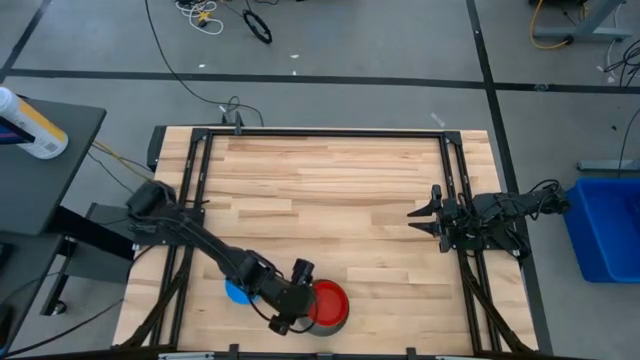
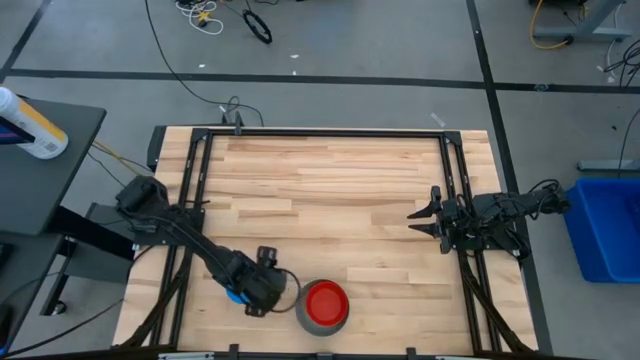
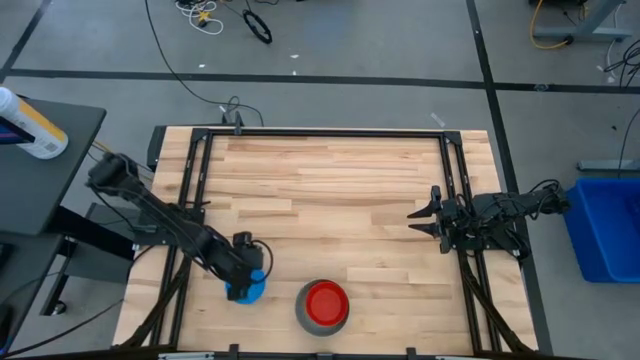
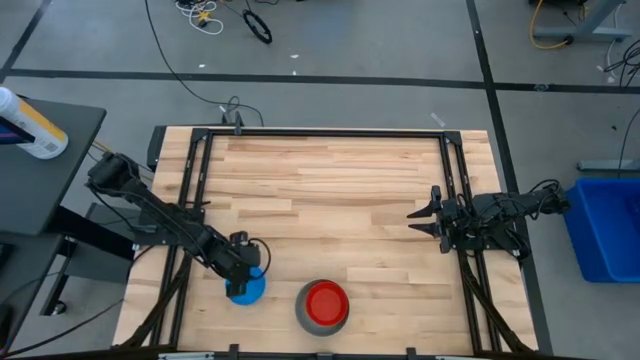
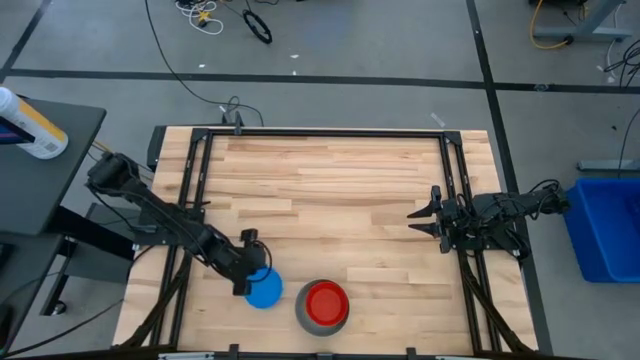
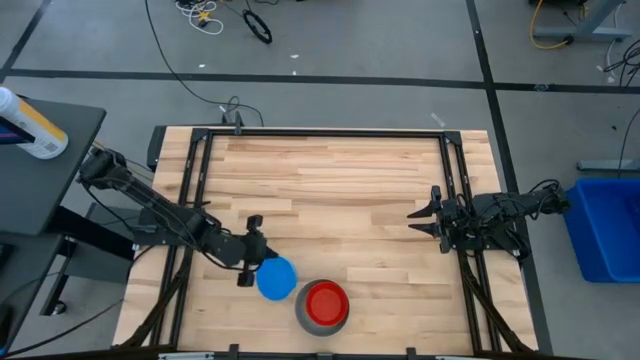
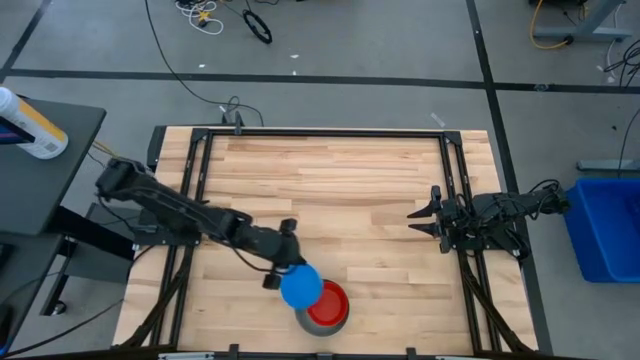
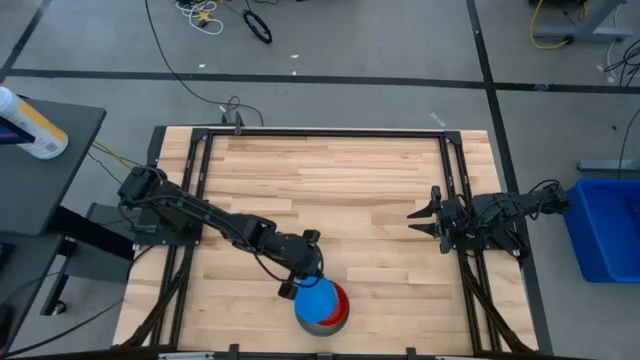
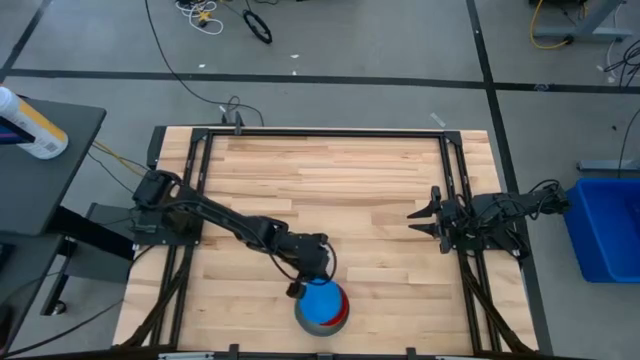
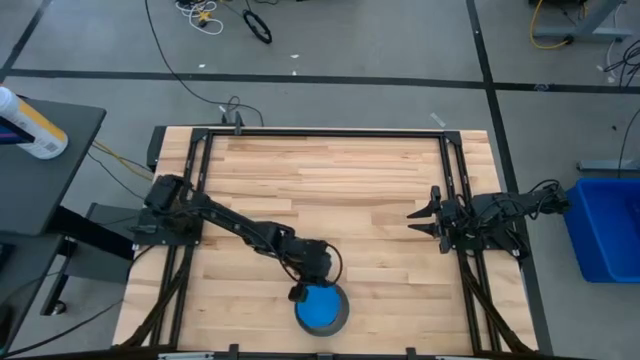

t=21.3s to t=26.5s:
Stack the blue bowl on on top the red bowl

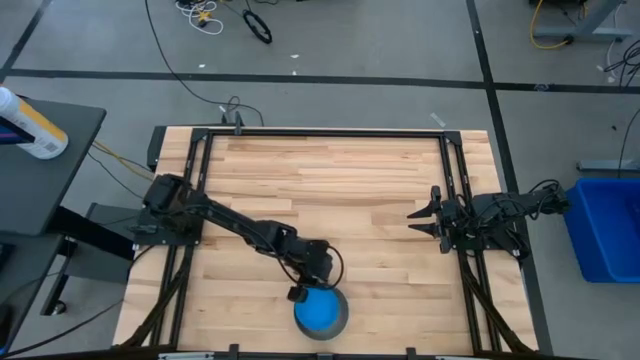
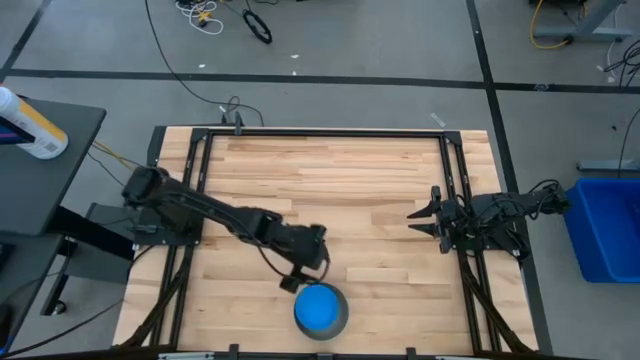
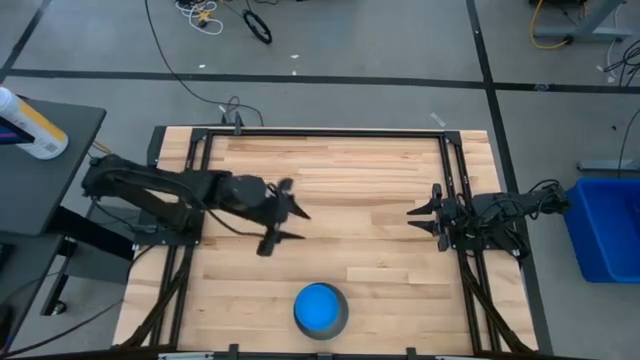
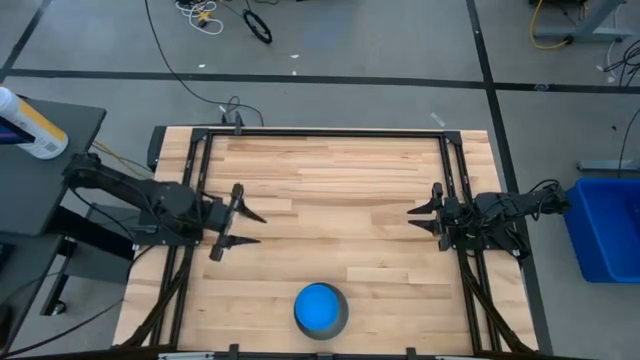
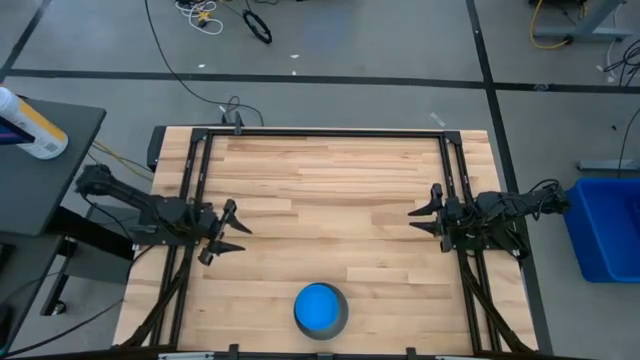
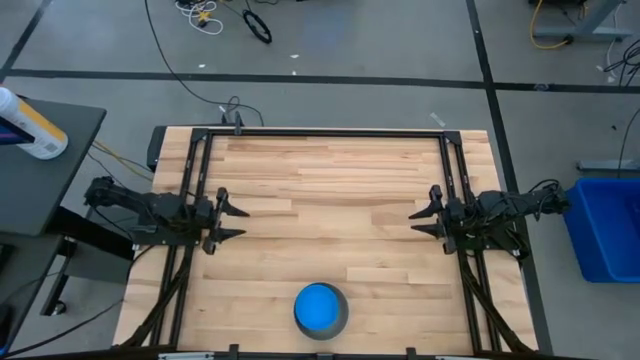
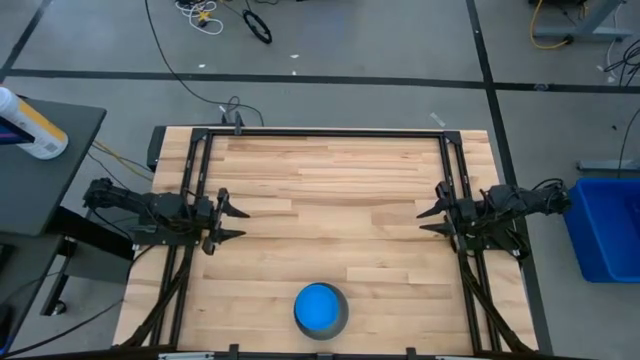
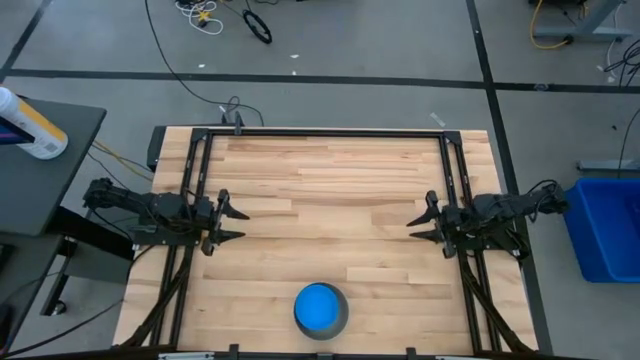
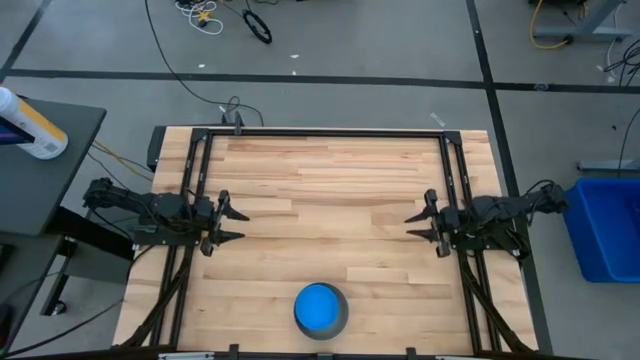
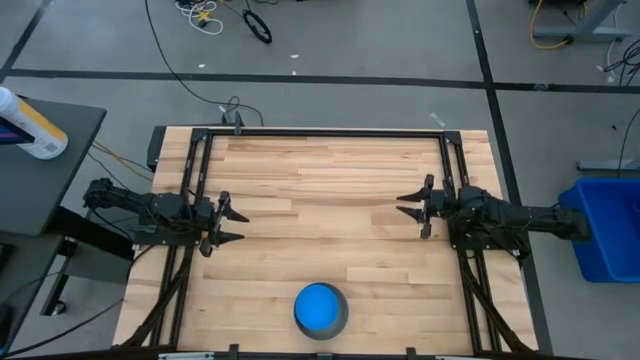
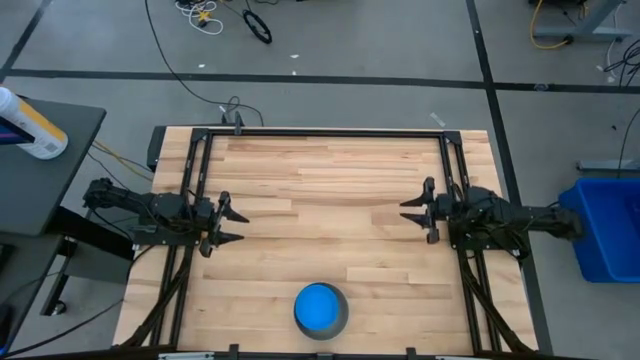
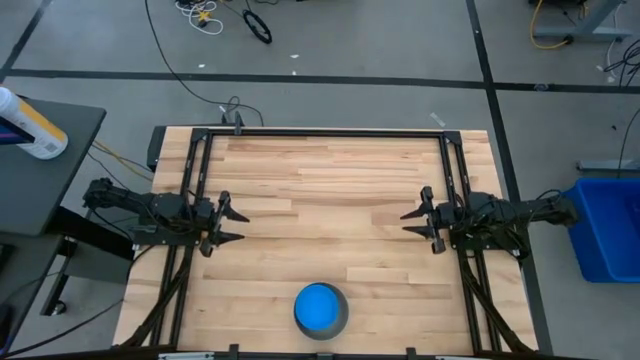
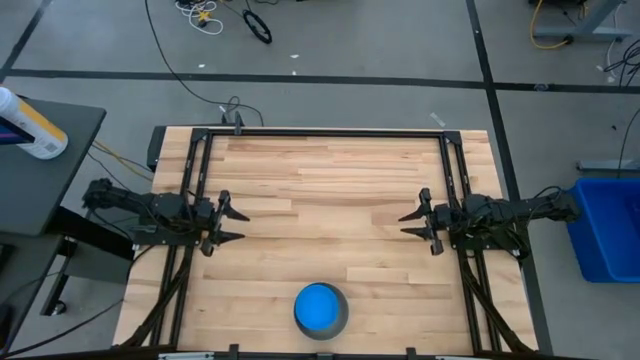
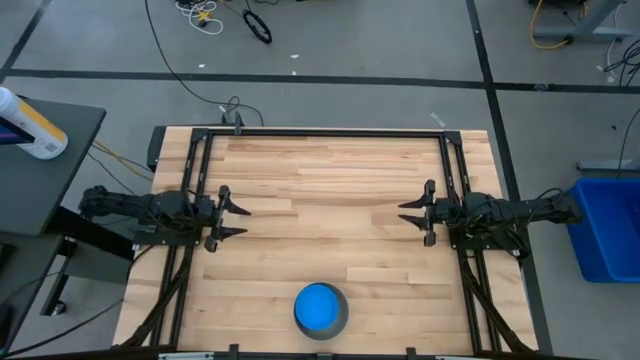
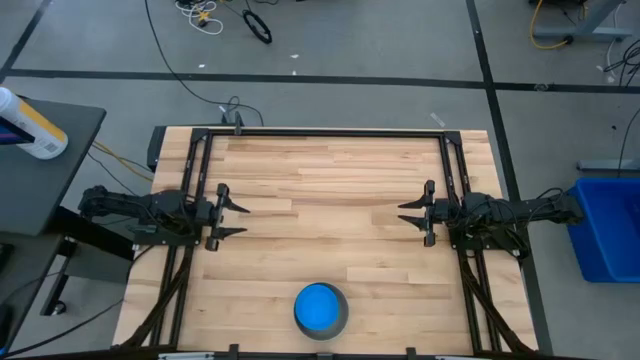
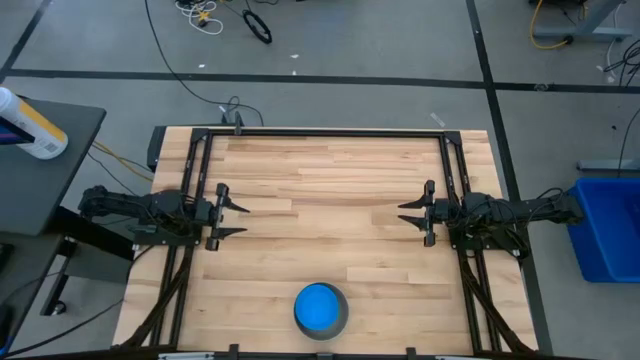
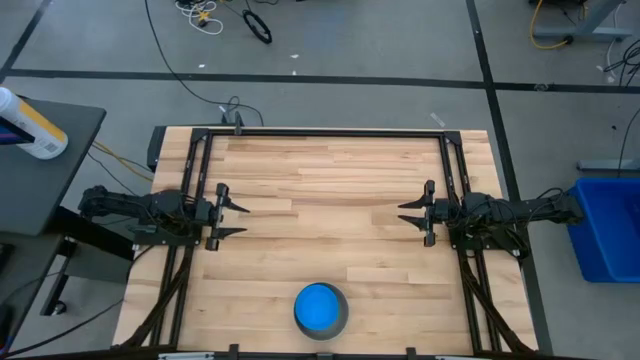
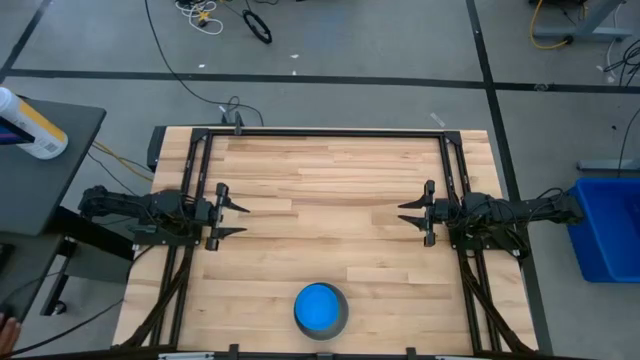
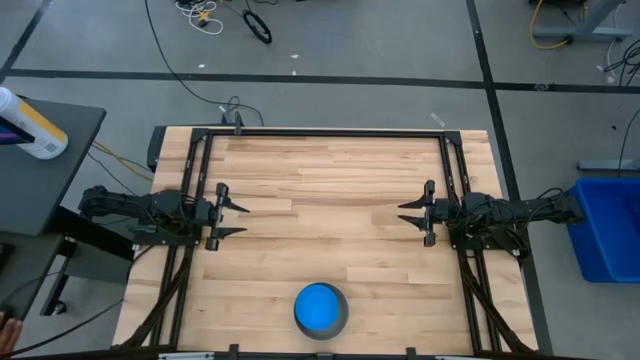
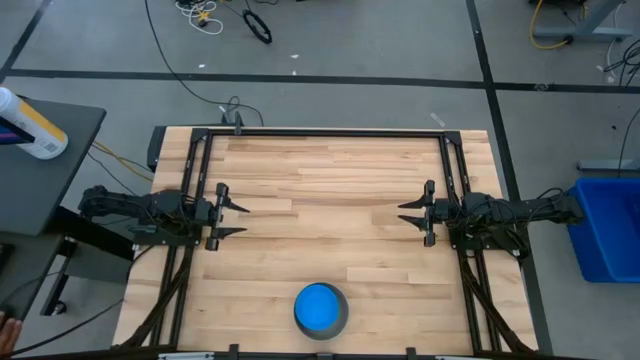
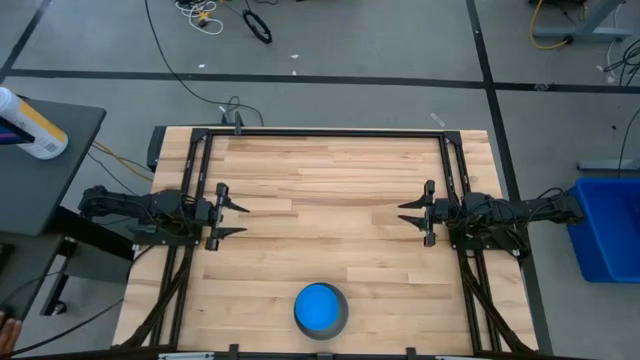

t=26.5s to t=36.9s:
Return to Home Position
